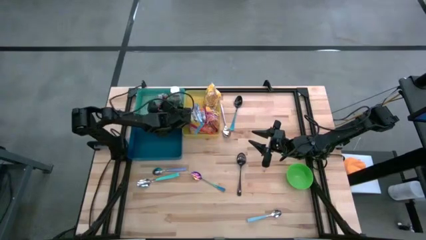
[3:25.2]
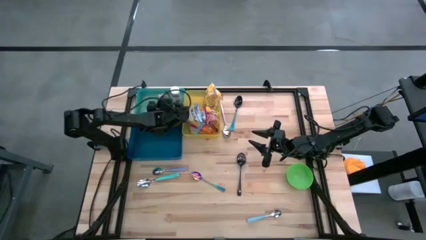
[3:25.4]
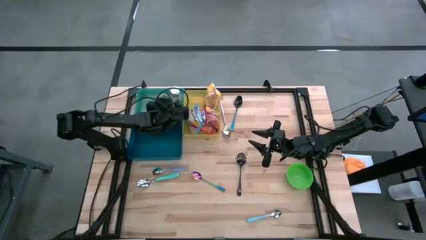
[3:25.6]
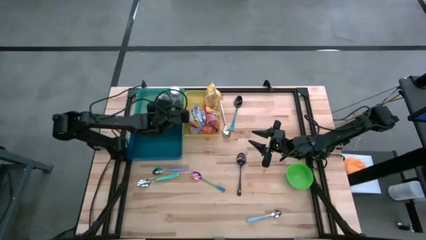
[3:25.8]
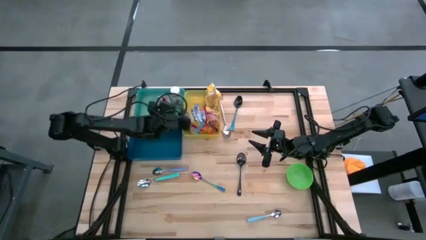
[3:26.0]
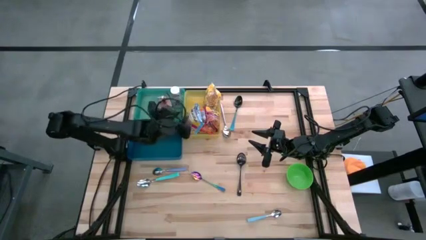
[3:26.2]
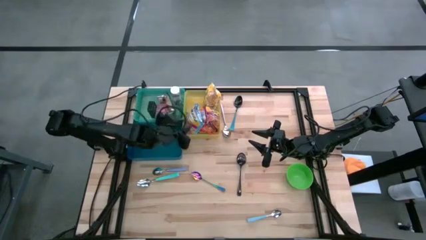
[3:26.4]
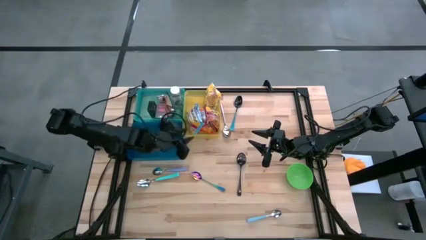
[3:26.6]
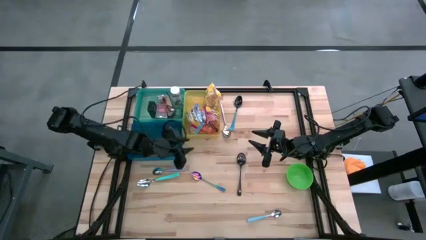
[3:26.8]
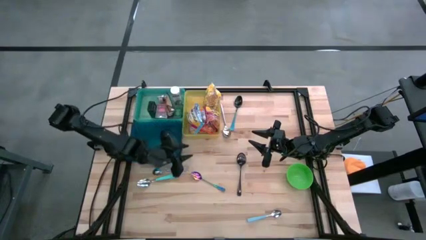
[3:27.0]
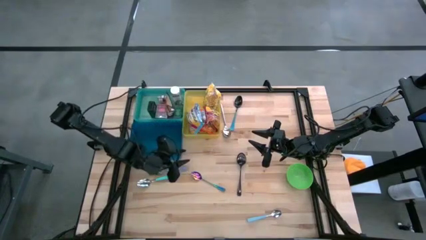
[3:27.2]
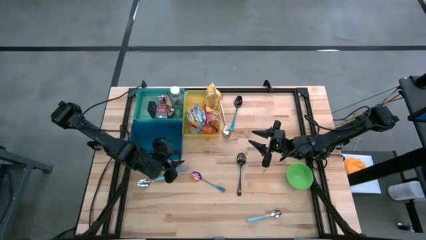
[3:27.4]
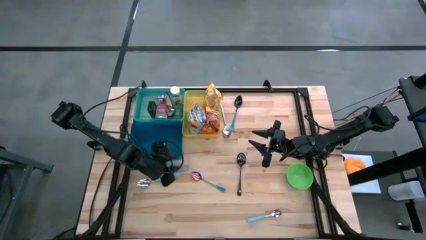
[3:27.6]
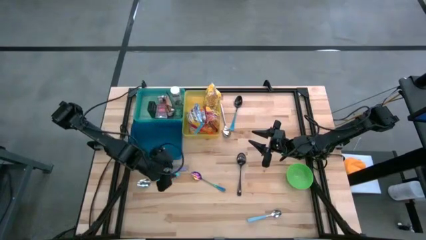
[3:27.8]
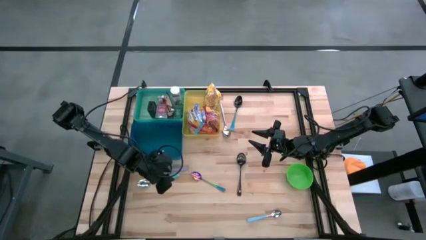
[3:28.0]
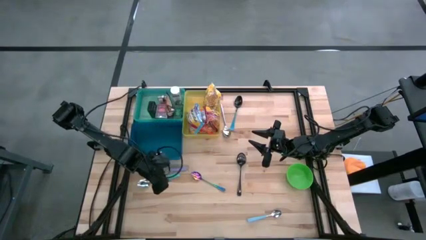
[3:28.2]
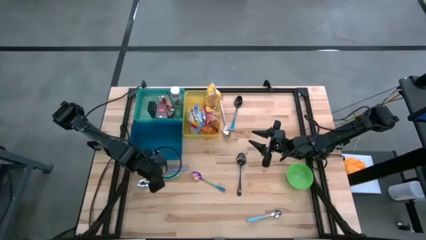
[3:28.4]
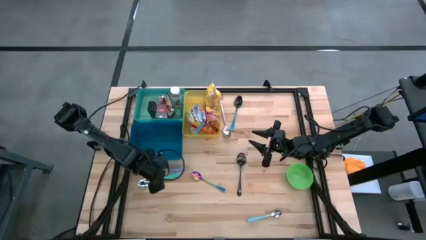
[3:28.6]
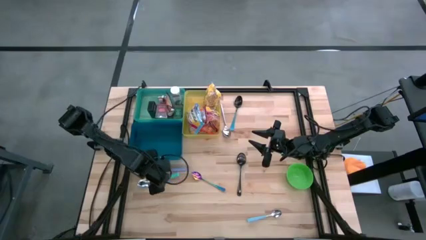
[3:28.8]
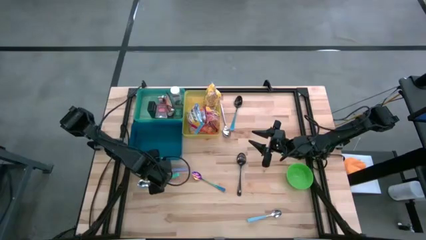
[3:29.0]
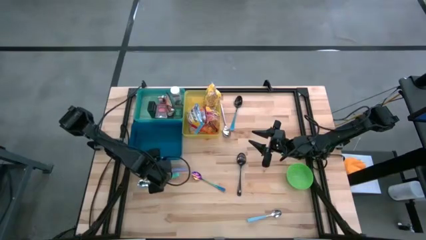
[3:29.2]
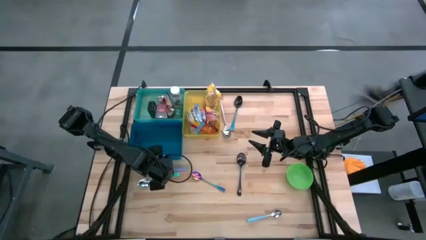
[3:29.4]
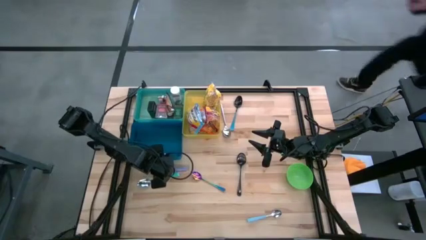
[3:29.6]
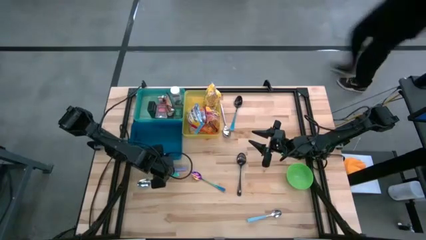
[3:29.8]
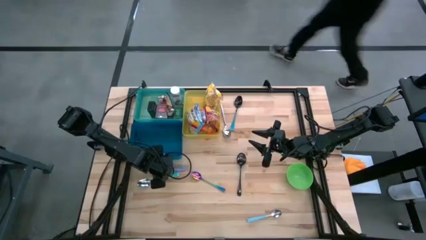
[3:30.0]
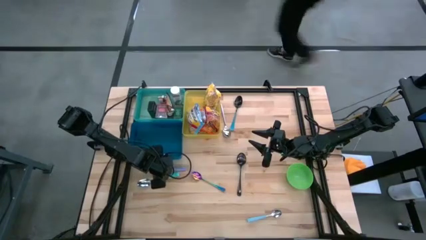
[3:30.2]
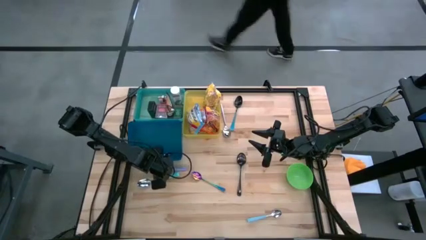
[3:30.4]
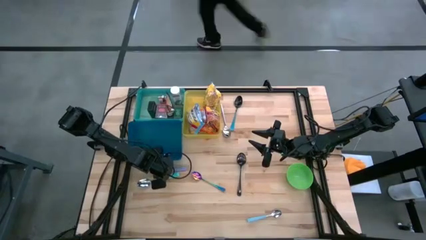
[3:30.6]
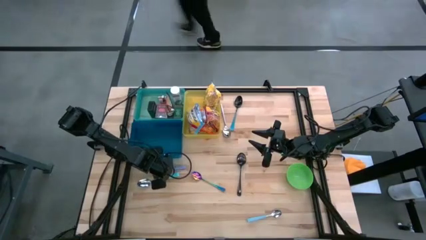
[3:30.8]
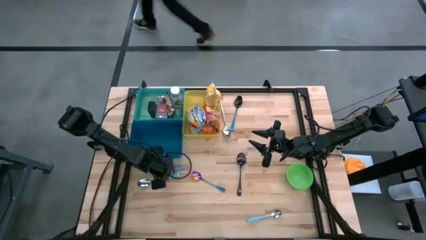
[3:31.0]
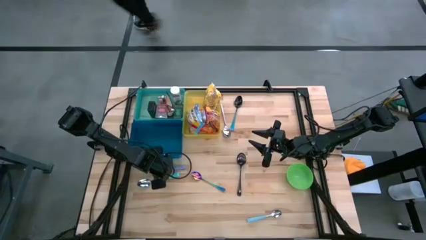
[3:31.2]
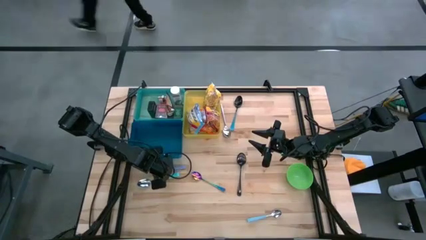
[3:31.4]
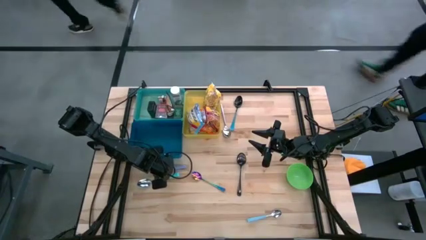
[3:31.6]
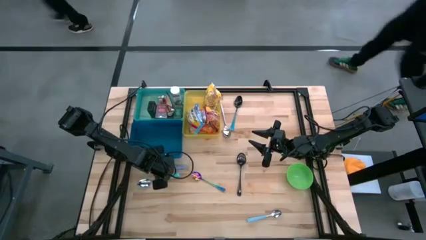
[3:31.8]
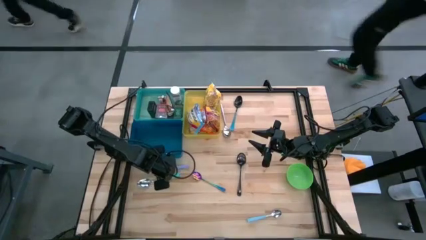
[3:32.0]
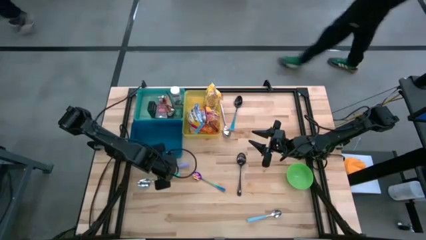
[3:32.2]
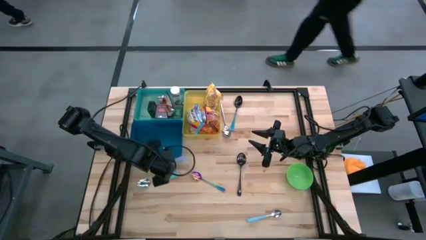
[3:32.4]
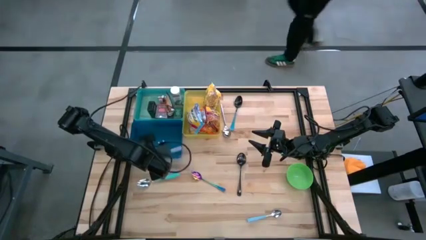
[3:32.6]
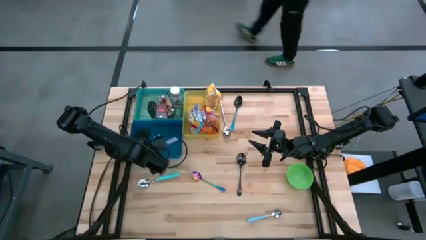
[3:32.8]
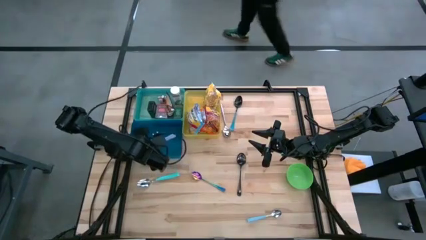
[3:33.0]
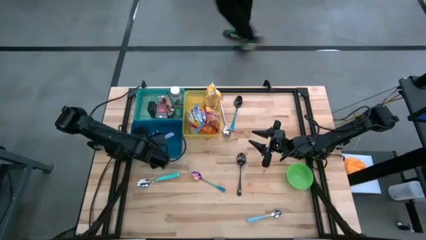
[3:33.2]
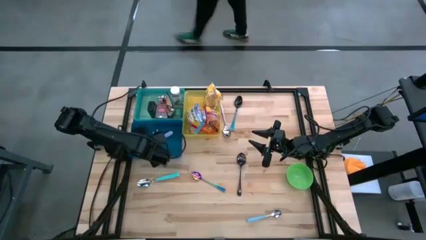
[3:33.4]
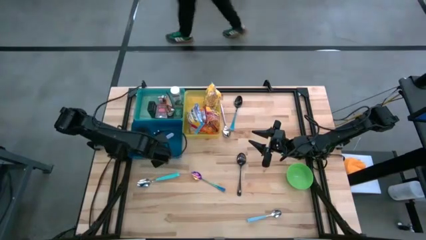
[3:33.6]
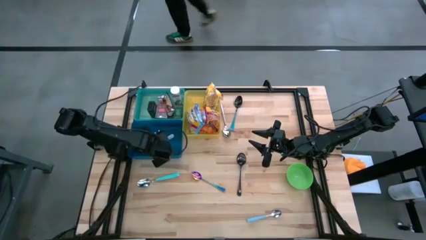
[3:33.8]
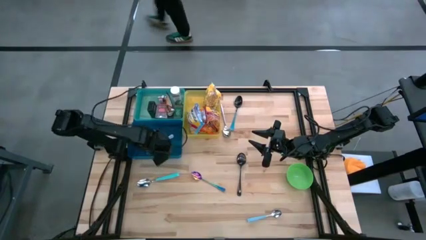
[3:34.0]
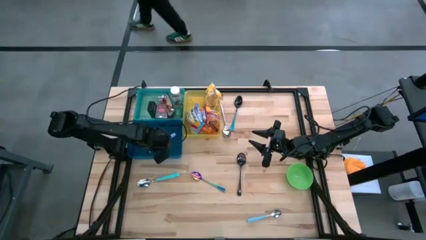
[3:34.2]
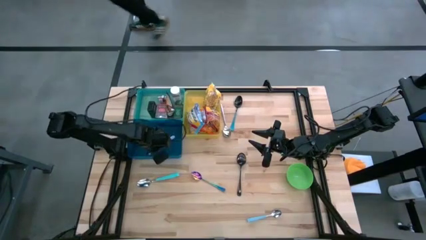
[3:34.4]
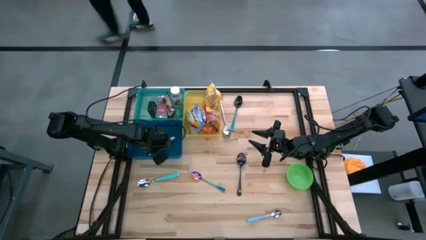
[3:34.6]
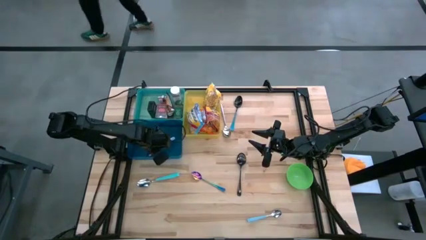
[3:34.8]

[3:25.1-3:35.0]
Put the purple spoon into the blue bin

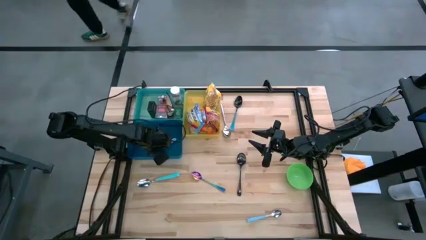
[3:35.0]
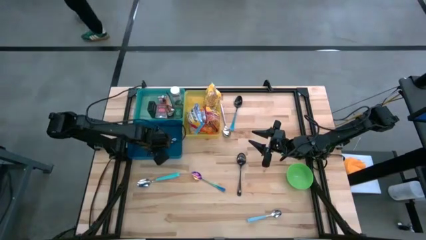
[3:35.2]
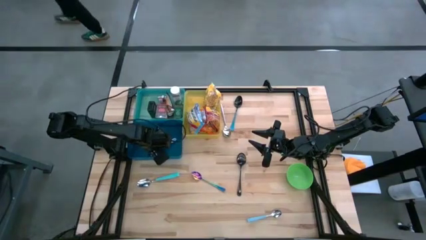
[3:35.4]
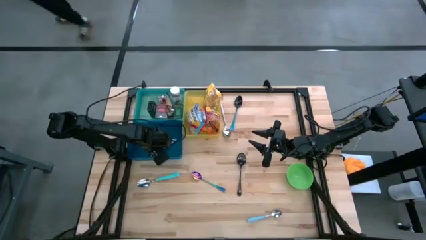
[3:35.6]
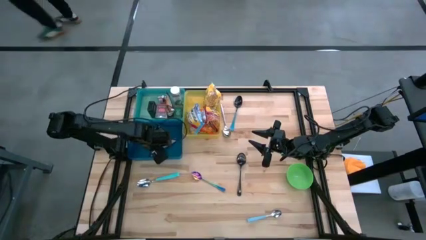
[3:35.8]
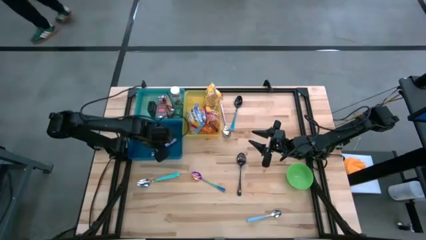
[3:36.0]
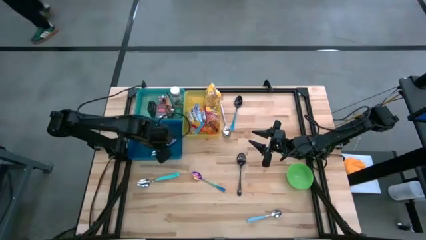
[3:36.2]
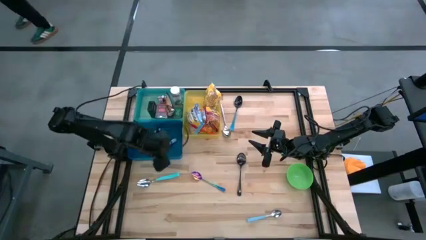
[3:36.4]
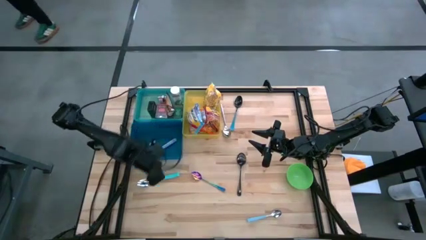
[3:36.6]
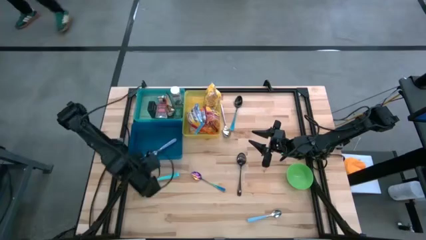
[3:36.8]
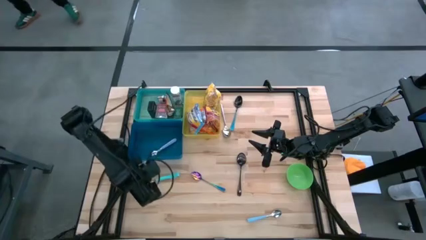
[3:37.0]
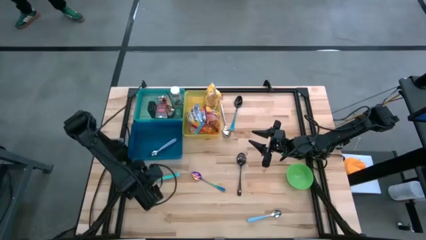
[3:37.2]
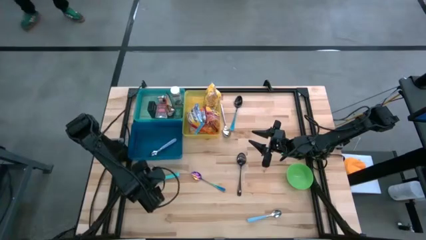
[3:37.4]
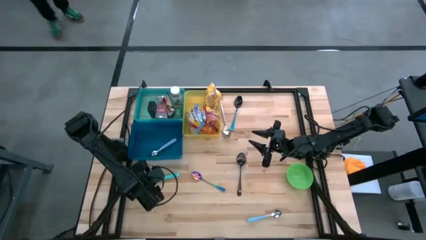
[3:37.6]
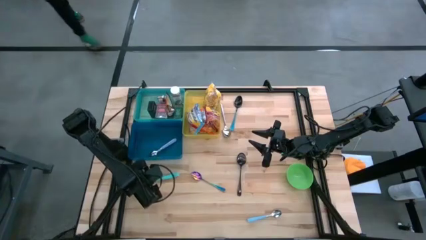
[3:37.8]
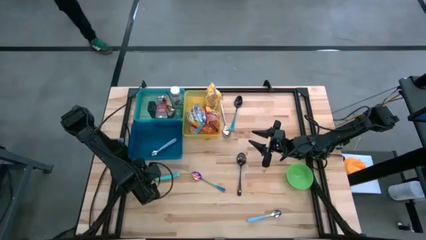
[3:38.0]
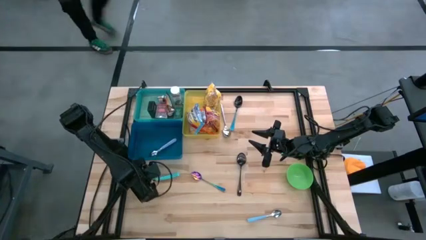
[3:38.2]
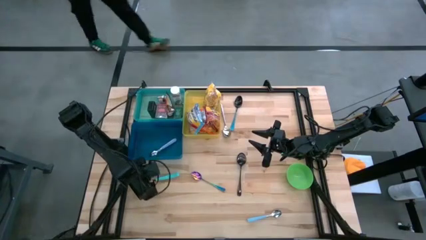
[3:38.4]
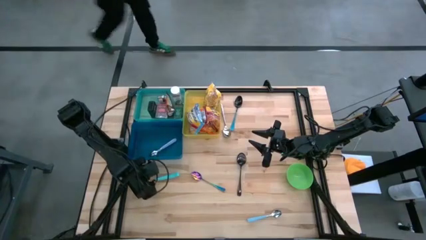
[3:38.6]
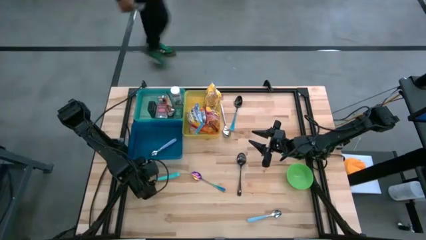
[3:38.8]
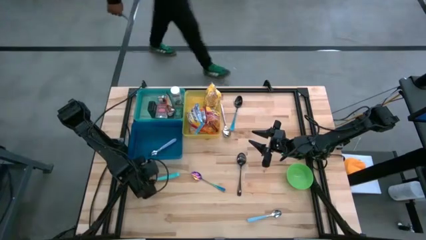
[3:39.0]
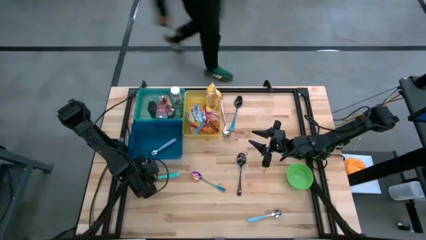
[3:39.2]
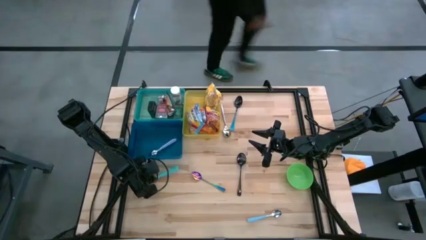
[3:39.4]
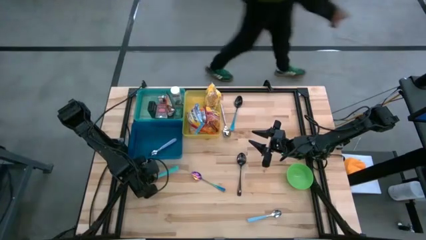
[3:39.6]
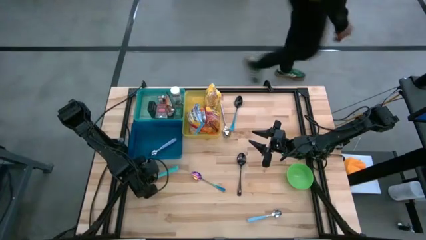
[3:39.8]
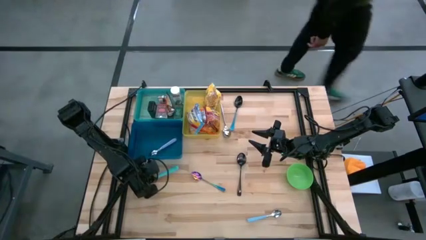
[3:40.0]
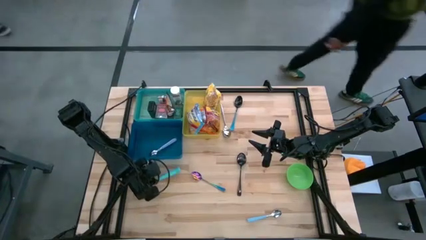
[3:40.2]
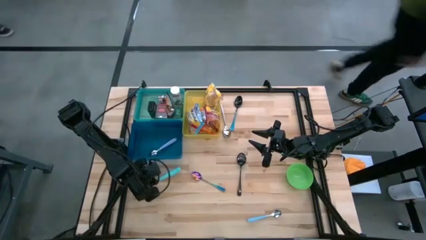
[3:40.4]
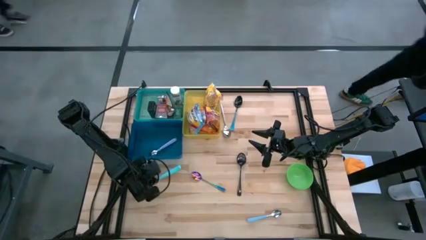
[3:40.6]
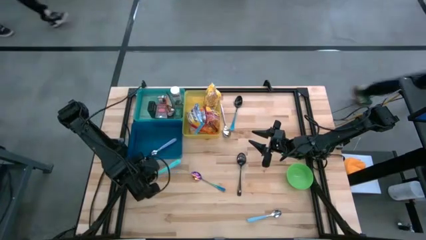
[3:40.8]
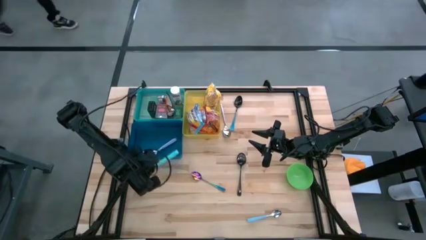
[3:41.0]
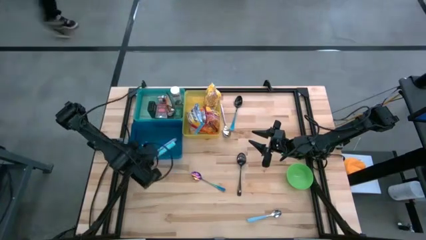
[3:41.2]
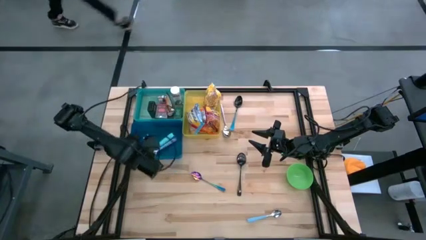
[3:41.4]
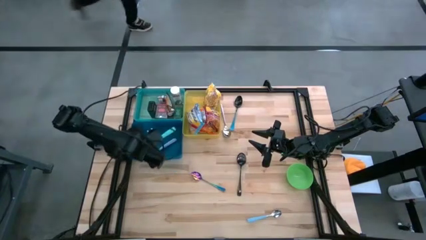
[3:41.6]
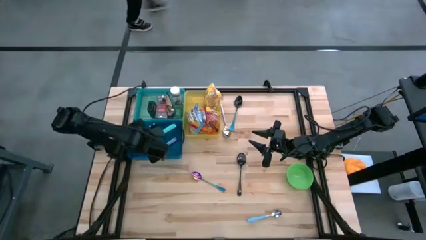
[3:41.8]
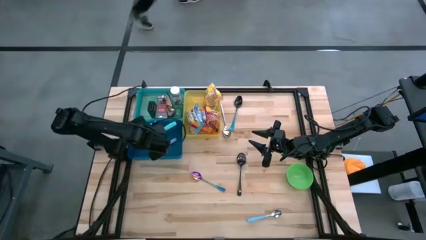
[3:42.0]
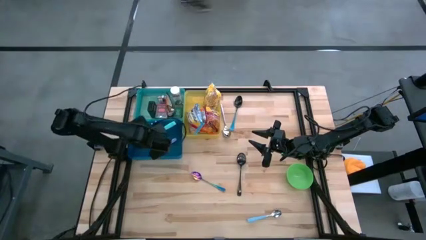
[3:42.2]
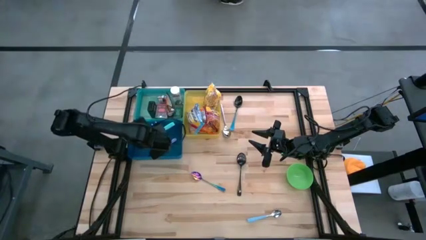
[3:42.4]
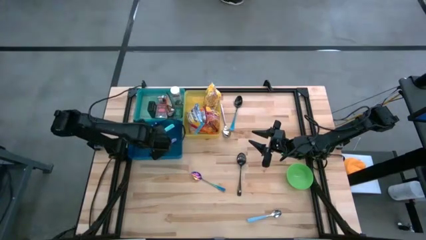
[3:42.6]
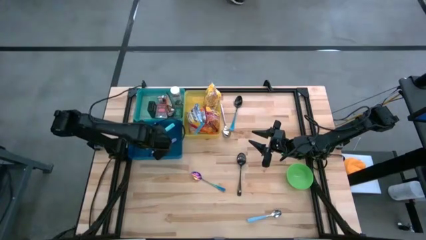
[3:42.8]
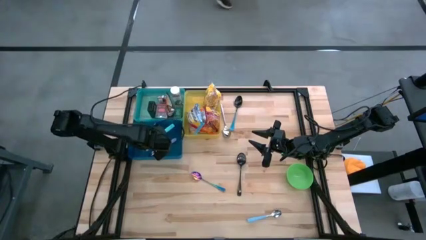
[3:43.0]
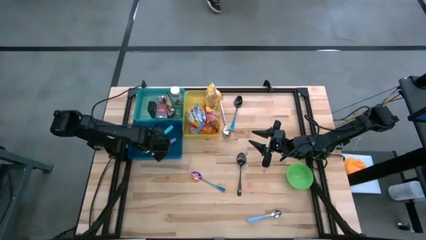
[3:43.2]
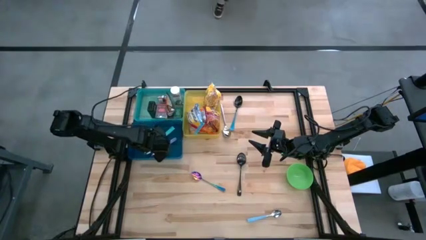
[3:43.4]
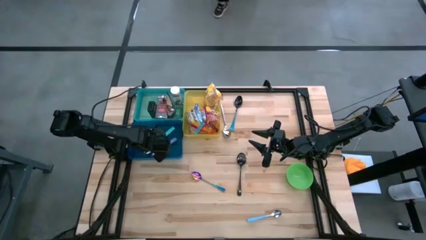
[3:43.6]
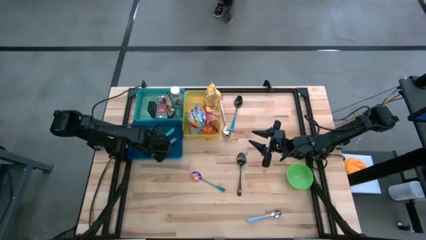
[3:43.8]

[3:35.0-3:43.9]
Put the light green spoon into the blue bin
